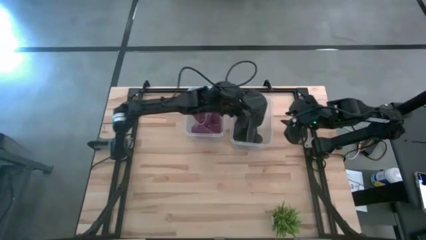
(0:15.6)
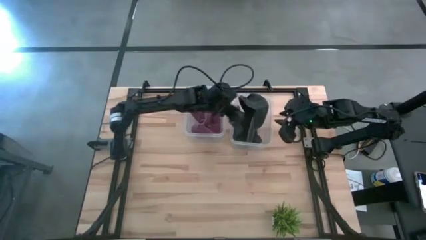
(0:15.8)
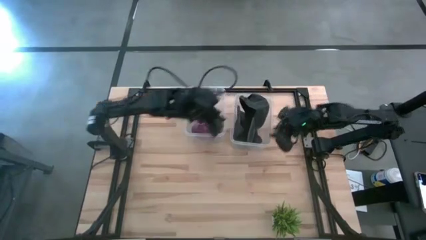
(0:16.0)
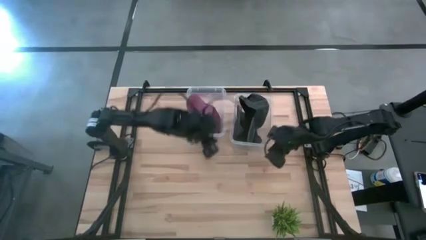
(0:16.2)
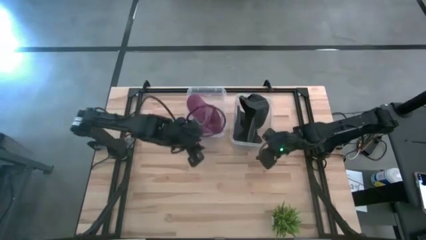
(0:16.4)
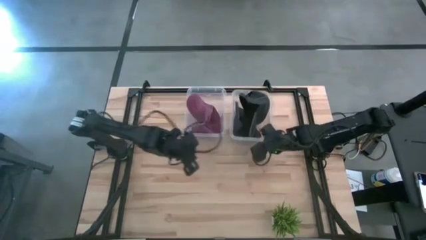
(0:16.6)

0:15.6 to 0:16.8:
Task: Pick & Place hat
Adjust the right transparent bin

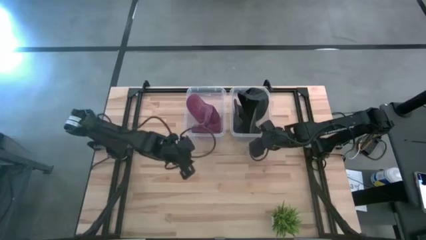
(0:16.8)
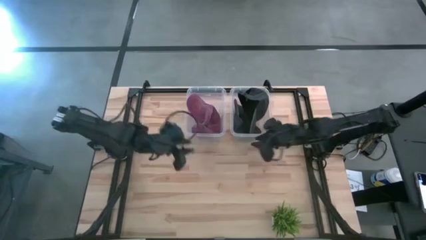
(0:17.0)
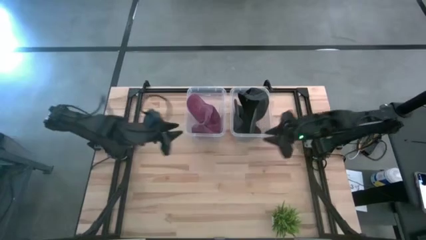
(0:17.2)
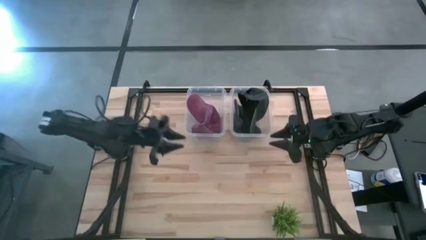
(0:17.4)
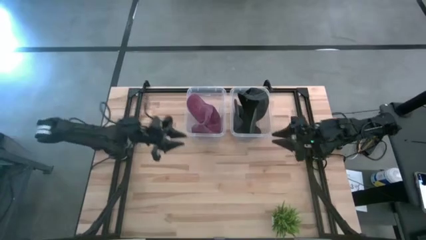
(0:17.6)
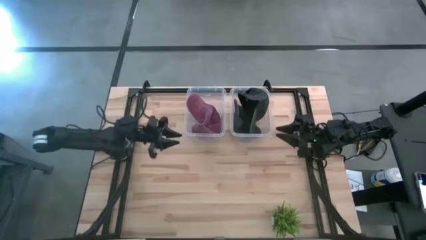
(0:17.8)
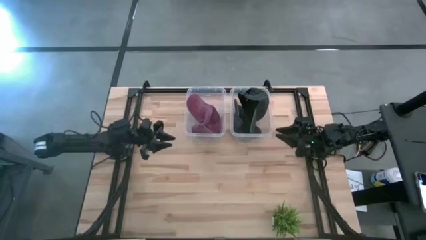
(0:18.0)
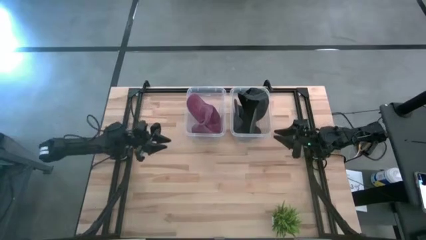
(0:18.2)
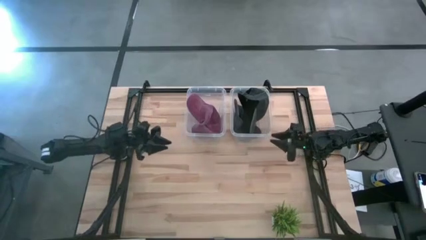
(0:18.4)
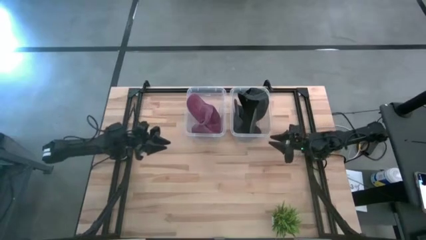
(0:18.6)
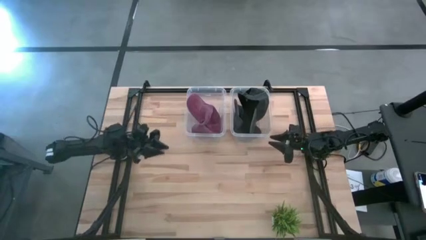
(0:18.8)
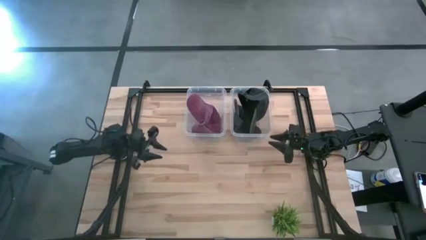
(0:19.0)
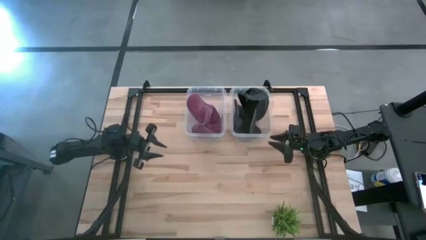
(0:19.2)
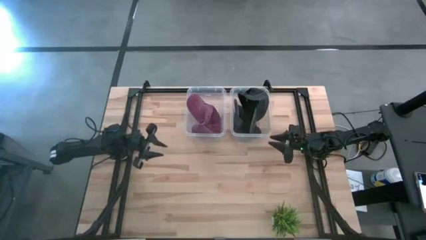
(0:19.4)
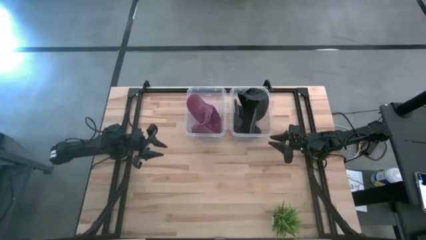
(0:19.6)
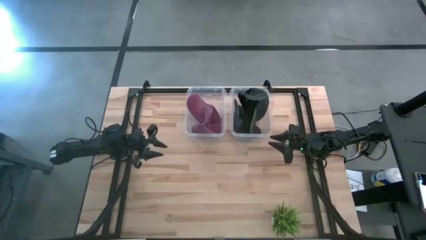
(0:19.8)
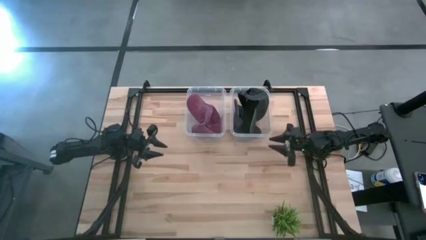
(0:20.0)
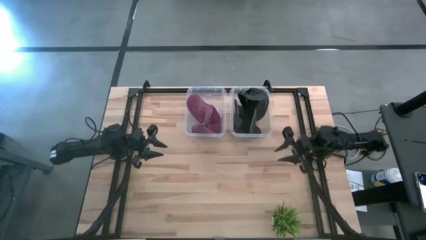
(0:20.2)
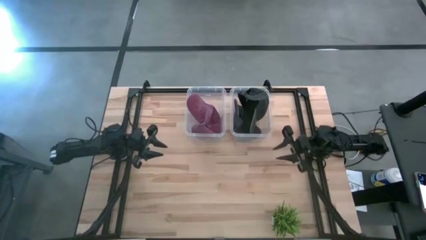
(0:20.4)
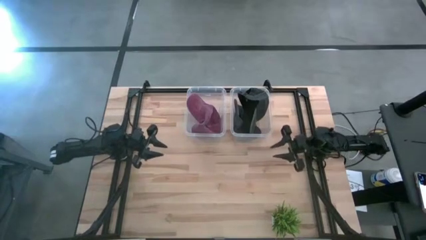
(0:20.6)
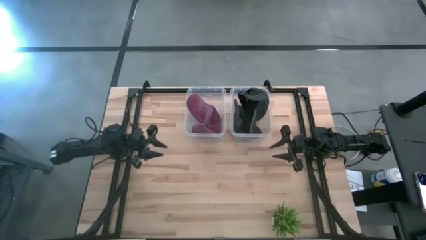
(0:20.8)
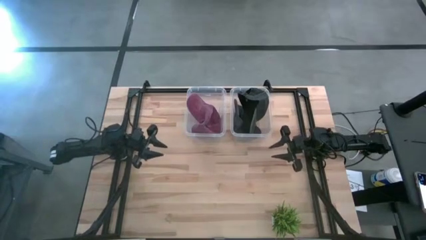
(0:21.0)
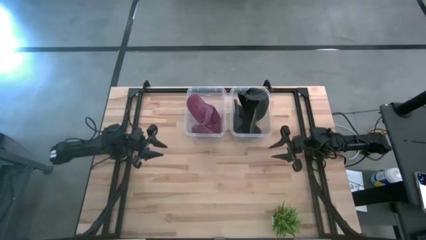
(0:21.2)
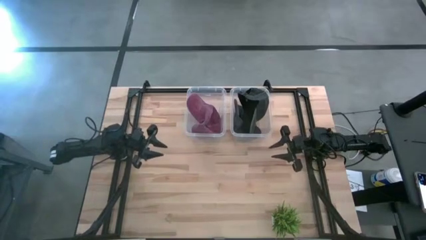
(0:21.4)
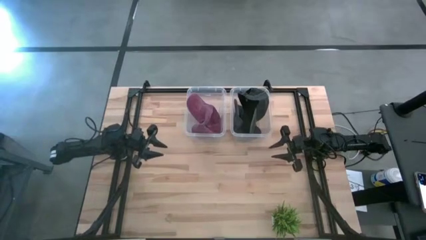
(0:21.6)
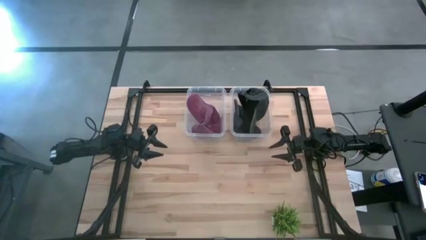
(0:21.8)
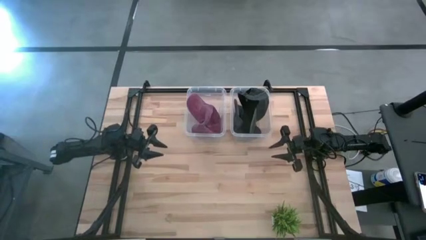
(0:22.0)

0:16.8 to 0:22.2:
Return to Home Position

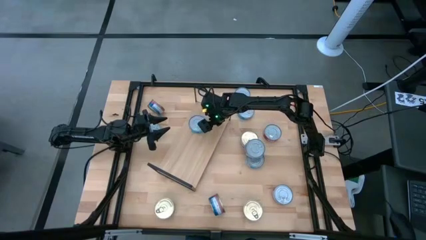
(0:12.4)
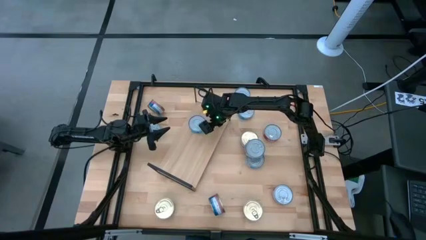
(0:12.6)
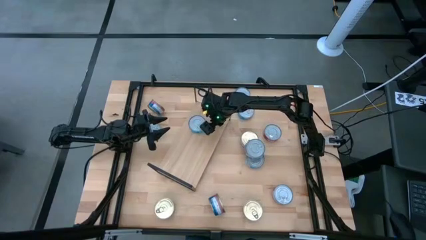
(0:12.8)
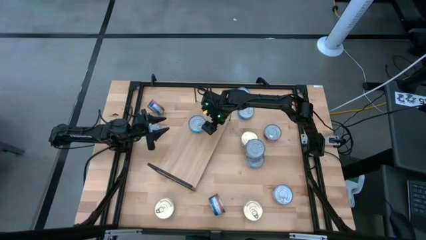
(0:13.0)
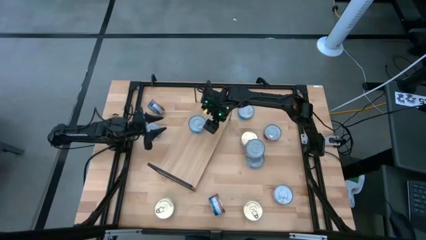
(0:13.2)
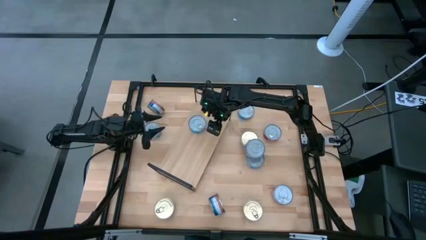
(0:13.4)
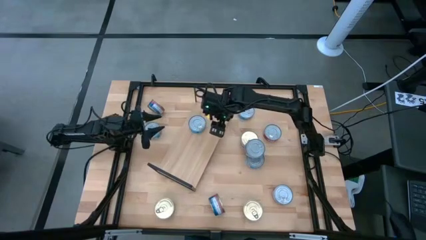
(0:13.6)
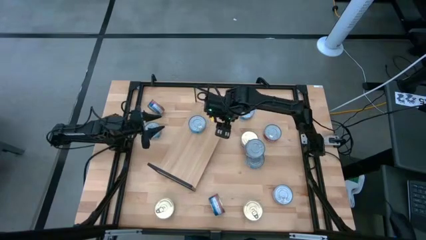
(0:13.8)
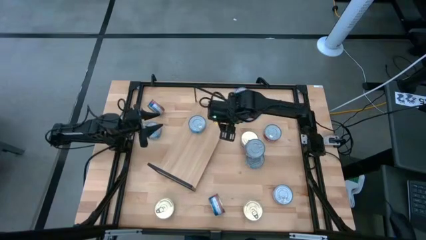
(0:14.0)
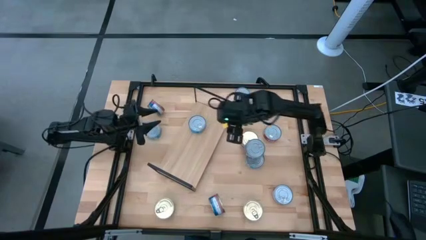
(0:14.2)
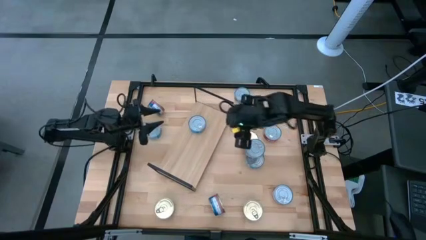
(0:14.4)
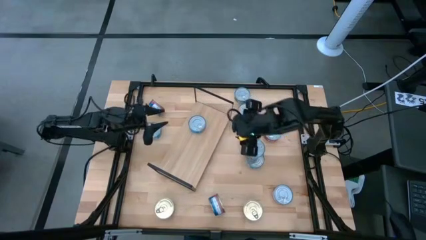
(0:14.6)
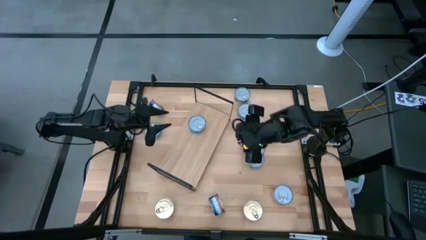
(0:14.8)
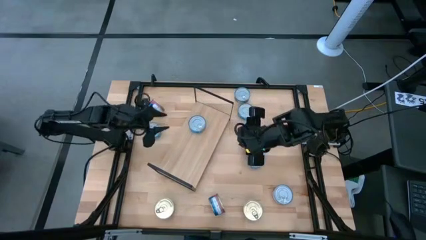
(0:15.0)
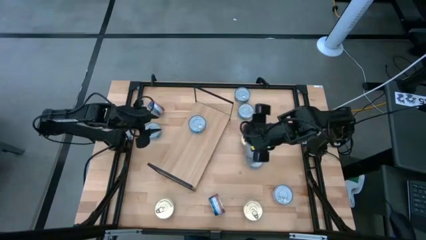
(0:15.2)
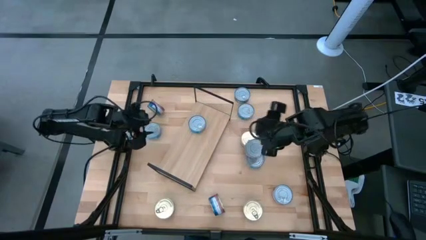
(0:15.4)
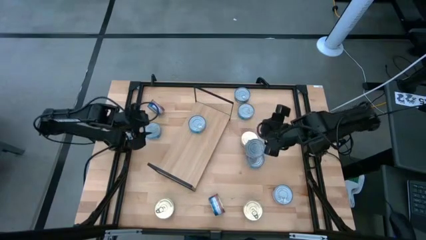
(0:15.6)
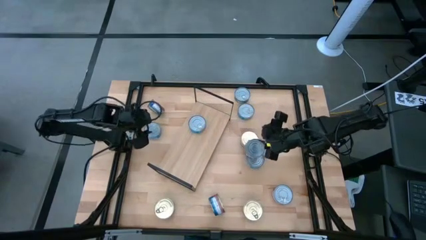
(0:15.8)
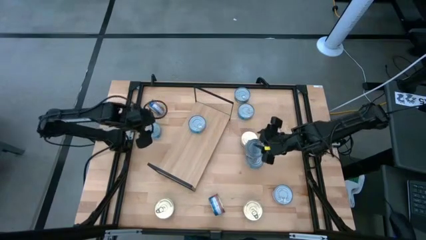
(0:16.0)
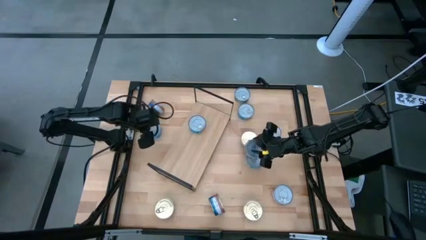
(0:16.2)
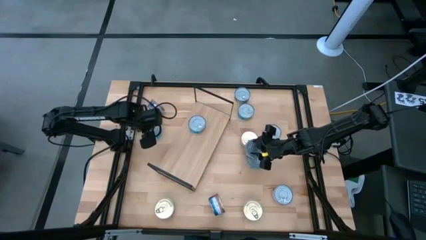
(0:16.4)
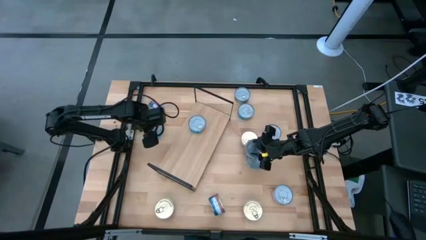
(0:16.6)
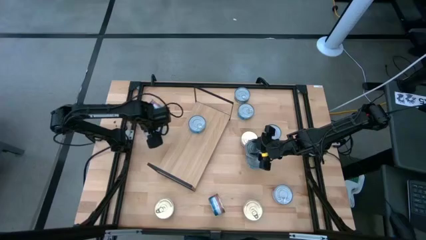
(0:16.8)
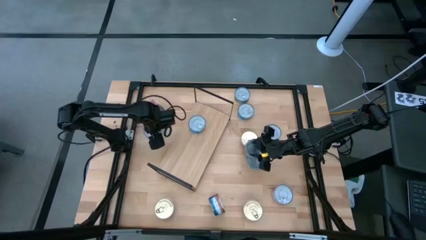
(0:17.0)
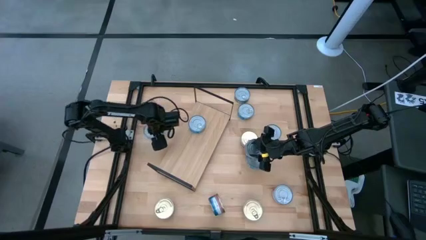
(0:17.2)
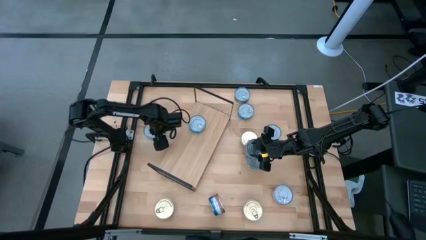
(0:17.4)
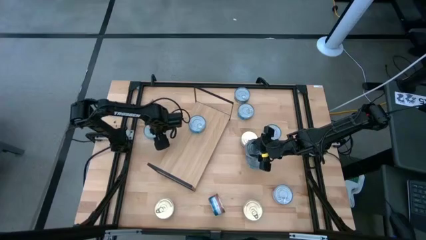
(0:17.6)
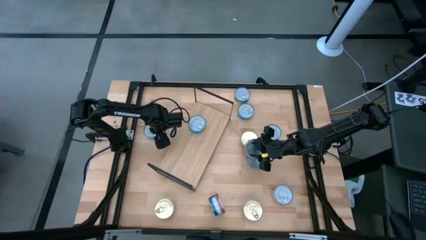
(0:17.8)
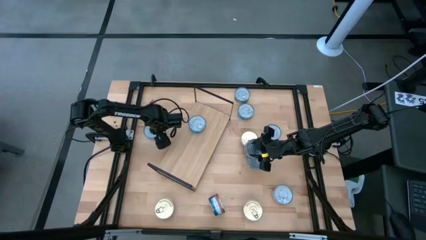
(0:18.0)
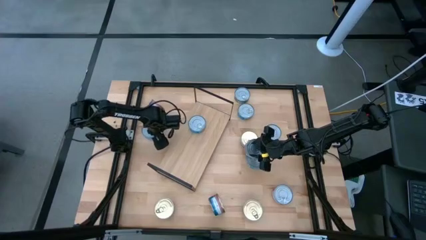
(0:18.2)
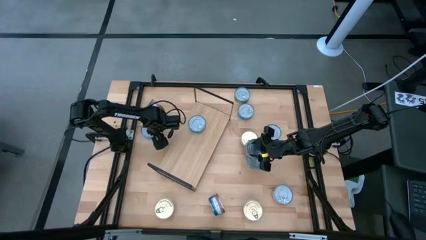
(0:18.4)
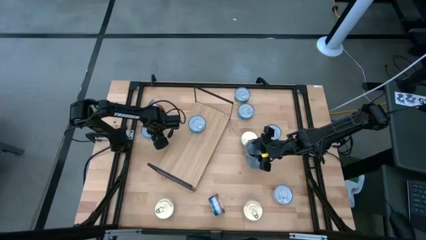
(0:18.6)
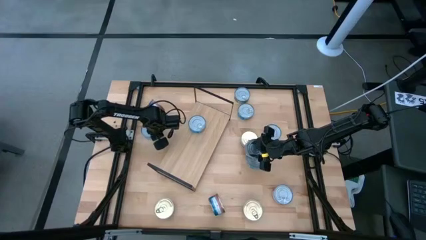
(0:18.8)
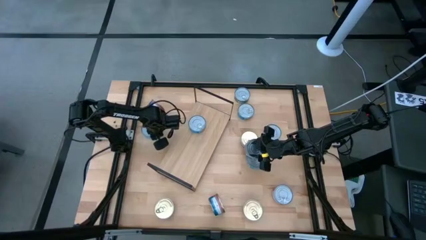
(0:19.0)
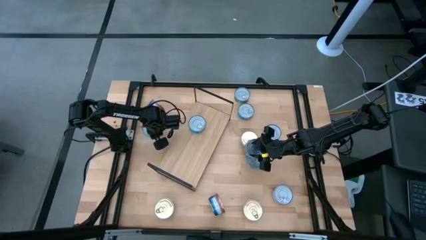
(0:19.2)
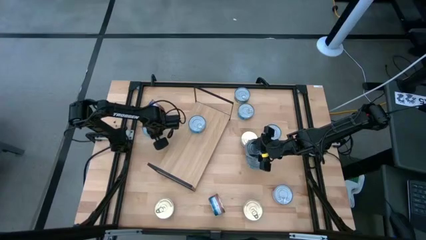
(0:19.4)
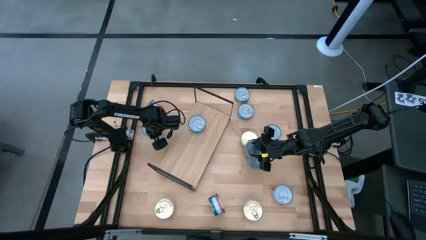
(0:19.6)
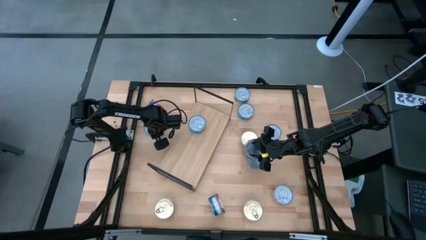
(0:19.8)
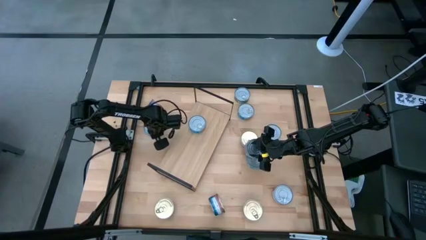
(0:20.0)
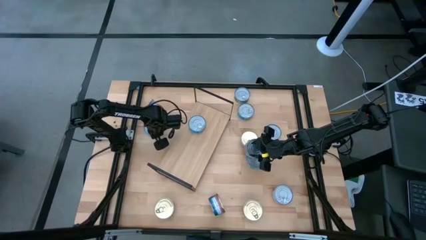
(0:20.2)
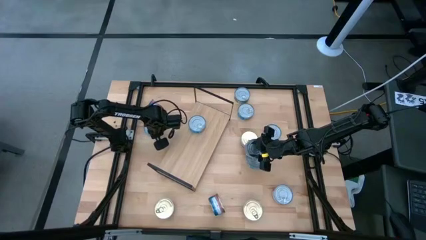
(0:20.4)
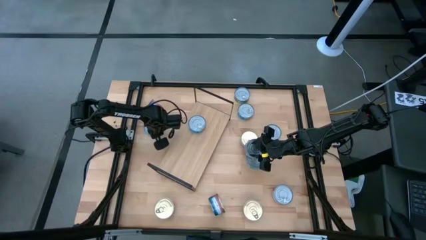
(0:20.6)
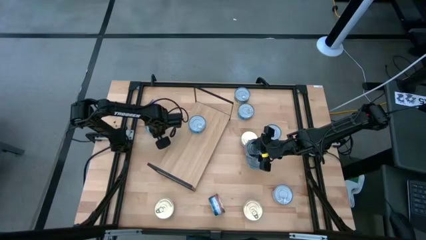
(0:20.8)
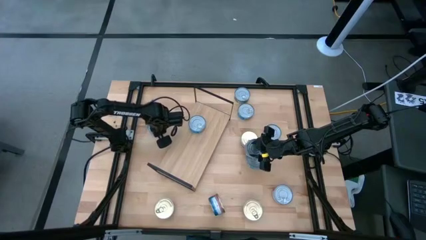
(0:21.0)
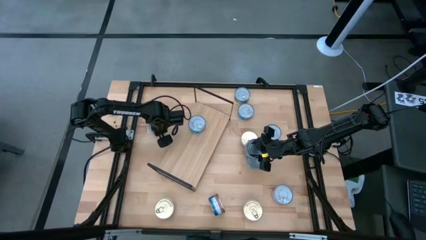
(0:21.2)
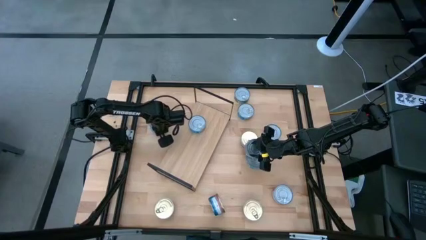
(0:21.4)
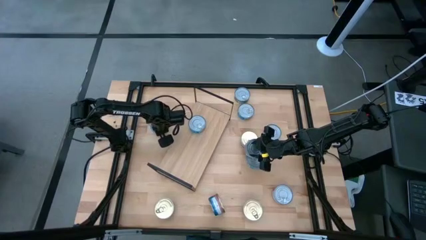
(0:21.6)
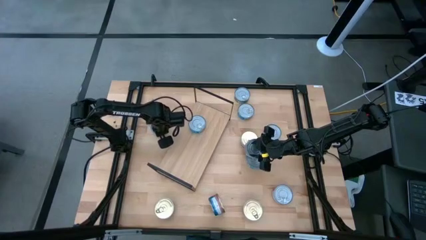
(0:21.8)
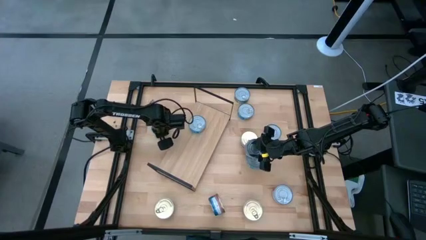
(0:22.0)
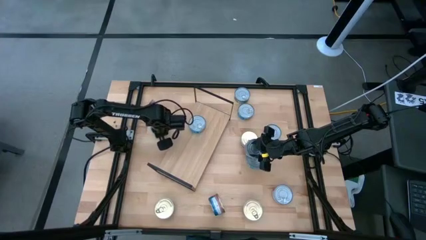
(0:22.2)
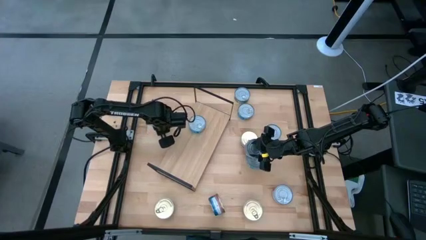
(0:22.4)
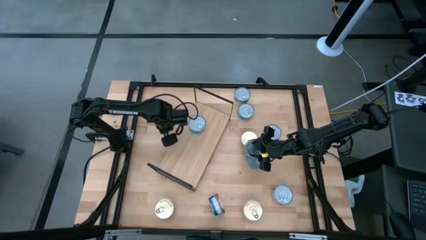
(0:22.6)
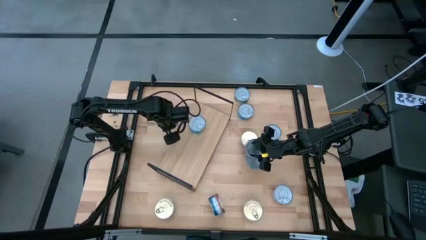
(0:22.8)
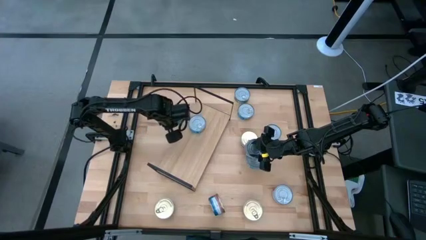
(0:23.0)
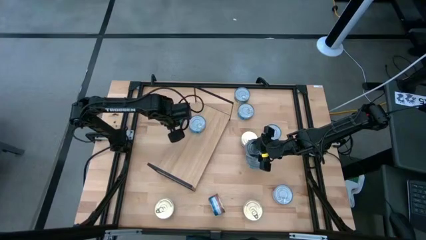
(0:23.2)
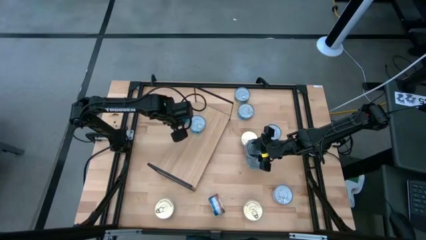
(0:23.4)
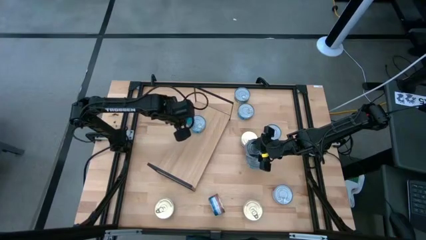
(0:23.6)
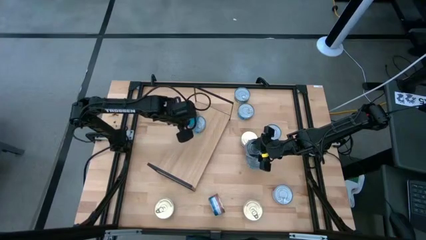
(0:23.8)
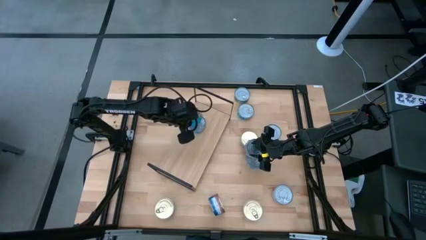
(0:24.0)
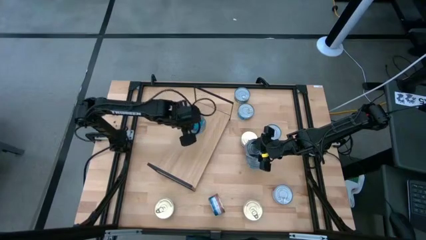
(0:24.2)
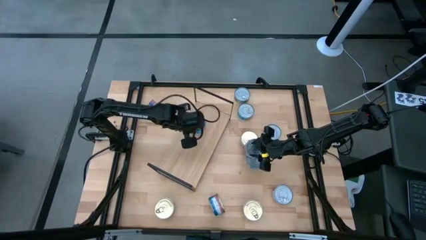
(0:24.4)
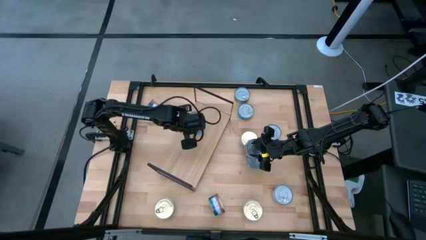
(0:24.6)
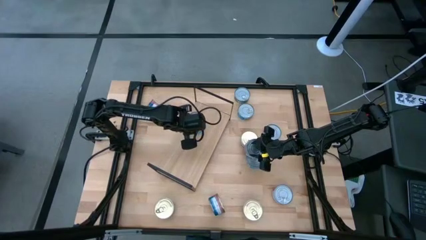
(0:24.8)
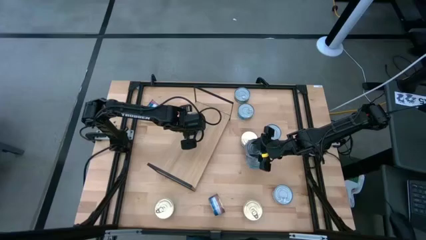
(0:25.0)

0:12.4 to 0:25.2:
Task: Stack canned seafood by type on shelf
Stack the light blue tuna can on top of the light blue tuna can on the shelf
